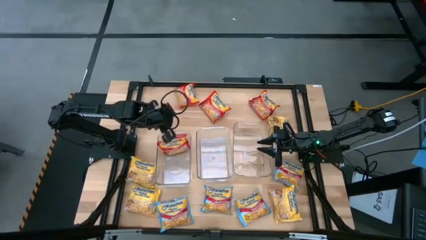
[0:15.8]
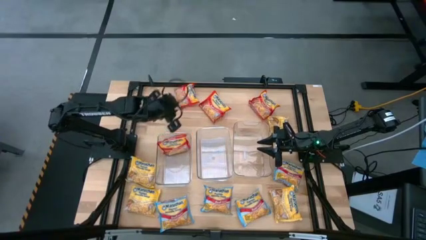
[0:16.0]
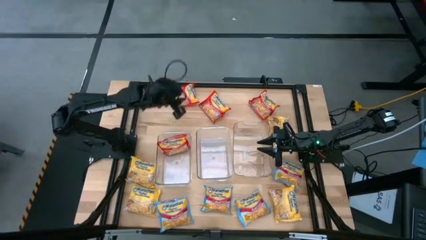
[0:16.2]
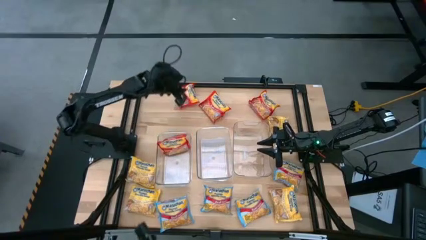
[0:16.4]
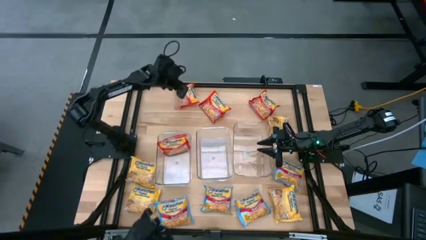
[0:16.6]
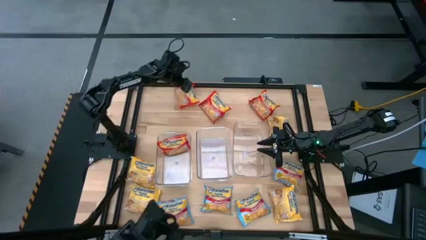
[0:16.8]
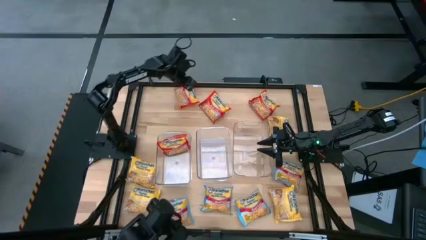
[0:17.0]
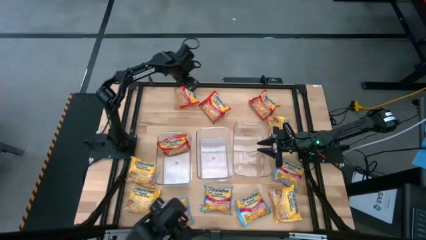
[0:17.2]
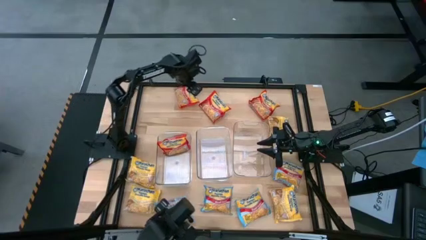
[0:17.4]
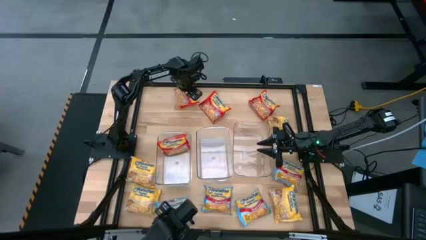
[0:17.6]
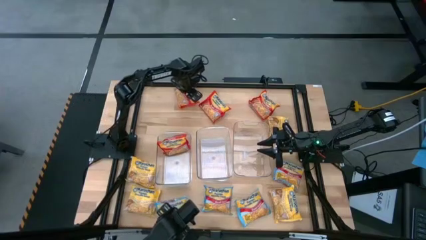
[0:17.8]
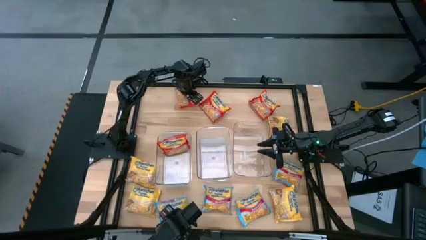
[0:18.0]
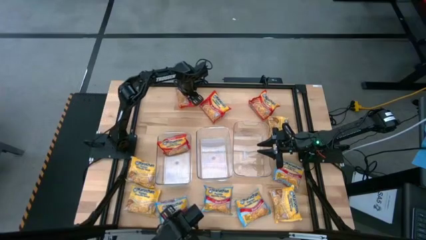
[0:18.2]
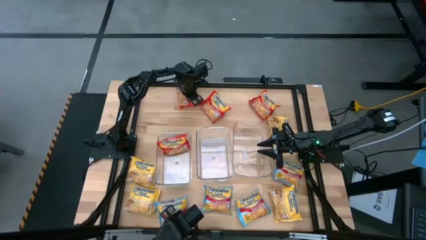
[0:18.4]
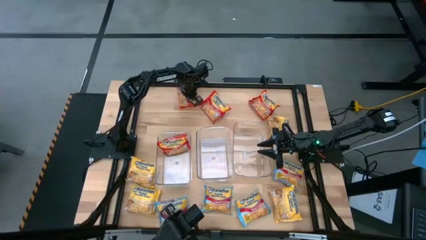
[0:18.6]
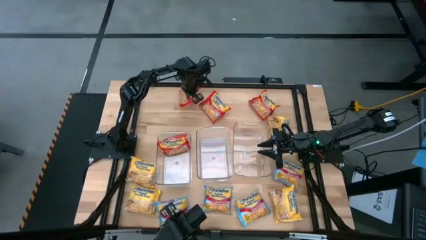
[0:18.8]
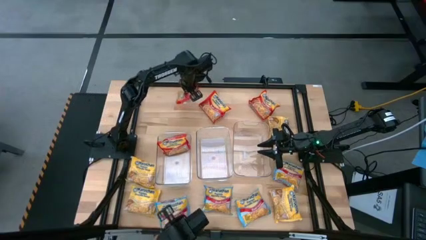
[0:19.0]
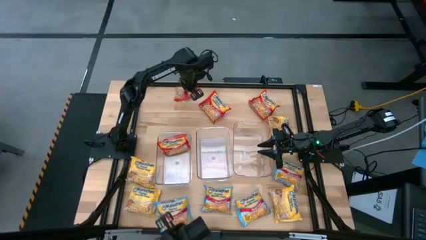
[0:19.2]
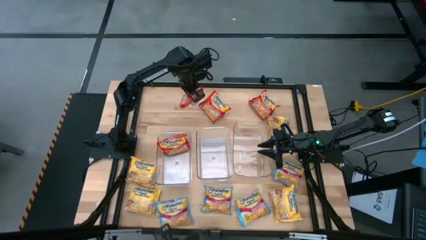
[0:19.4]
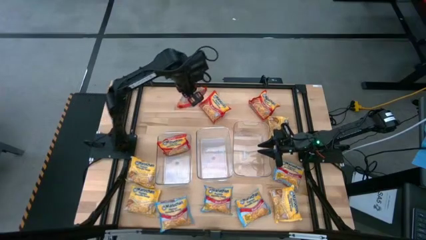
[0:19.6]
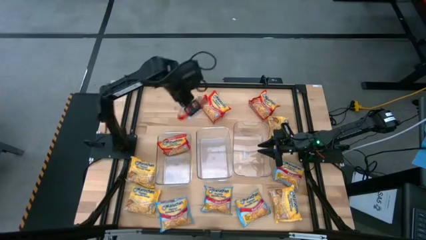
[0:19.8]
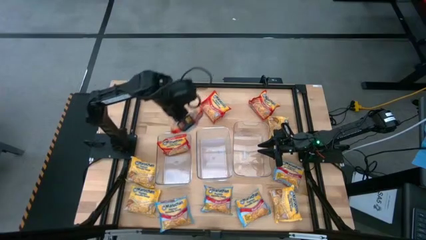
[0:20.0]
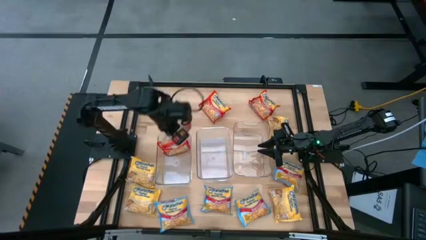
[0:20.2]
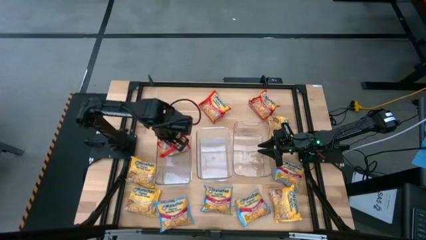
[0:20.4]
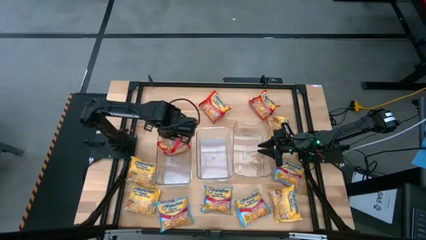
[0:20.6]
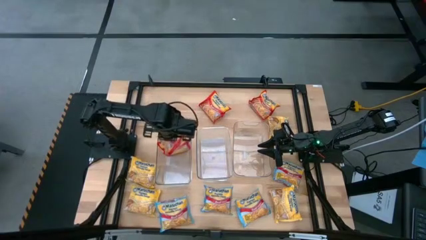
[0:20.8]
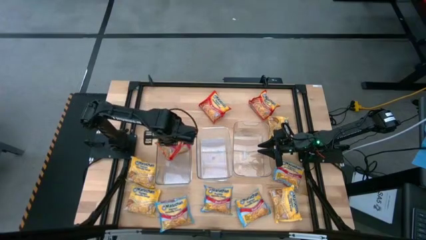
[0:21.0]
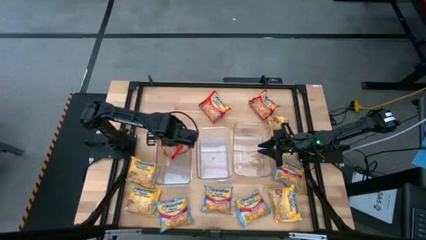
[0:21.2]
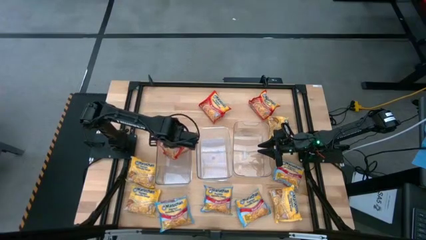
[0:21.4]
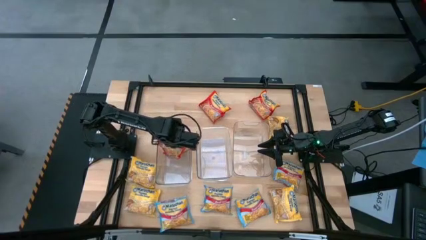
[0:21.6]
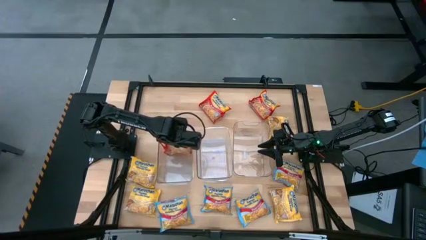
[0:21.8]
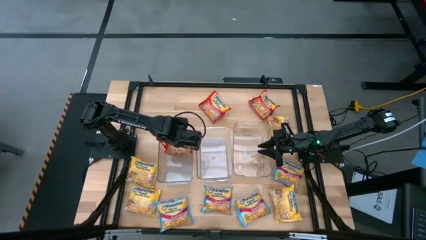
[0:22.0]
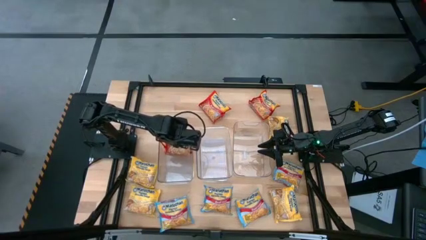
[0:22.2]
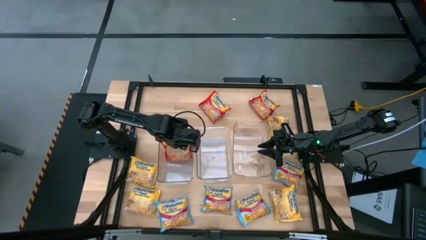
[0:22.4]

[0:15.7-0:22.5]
Task: Sort Maruchan noodles
Put the red noodle pack into the left transparent bin

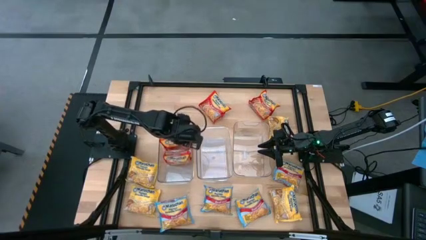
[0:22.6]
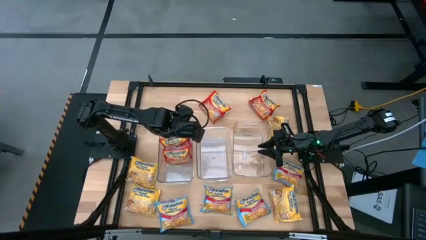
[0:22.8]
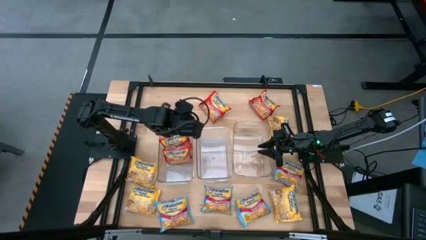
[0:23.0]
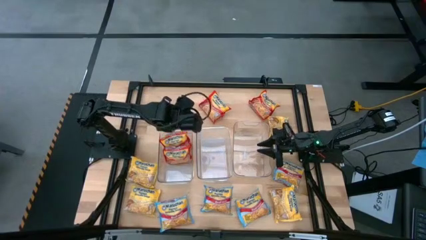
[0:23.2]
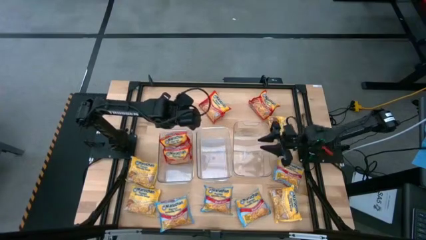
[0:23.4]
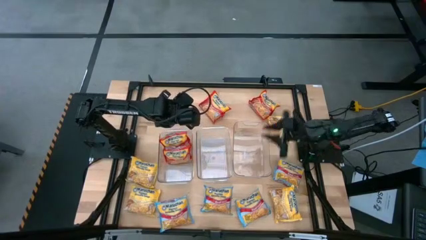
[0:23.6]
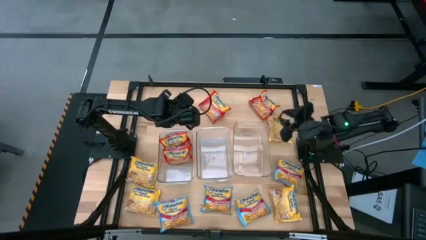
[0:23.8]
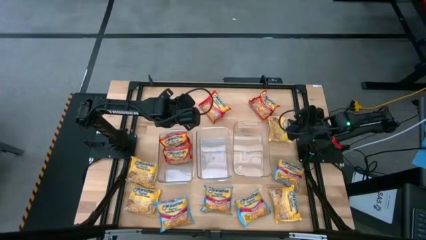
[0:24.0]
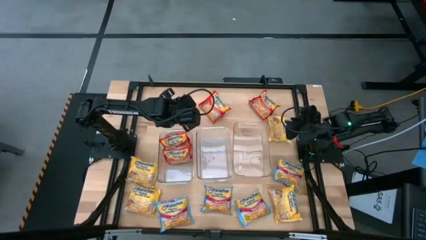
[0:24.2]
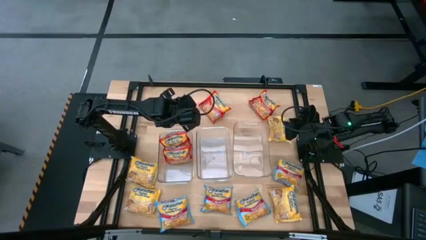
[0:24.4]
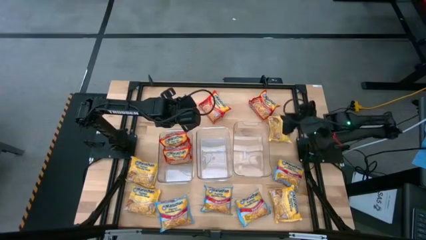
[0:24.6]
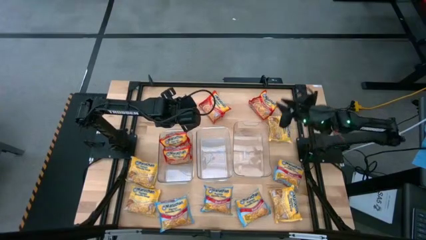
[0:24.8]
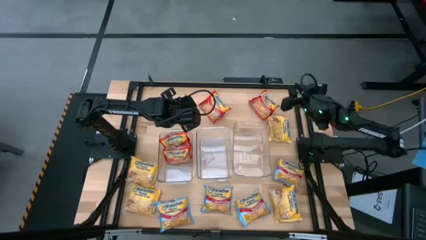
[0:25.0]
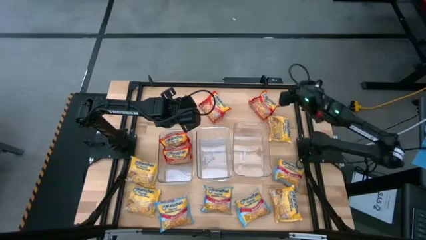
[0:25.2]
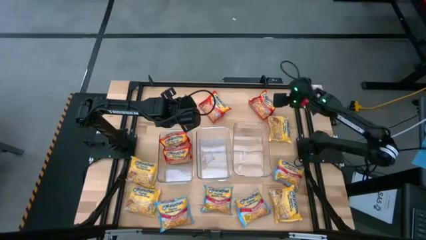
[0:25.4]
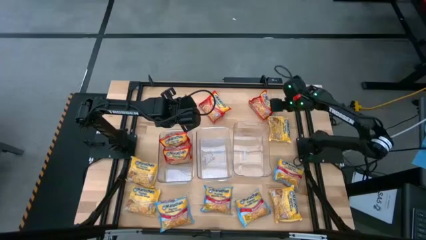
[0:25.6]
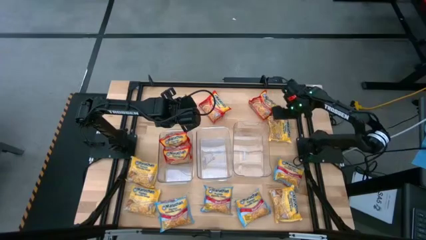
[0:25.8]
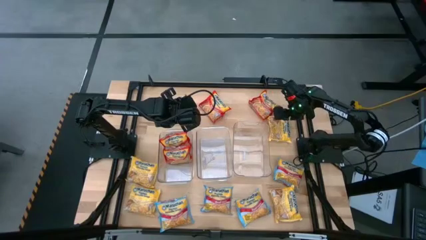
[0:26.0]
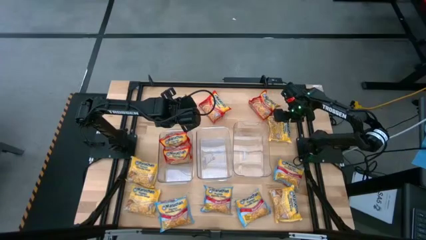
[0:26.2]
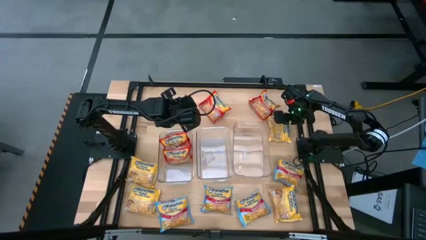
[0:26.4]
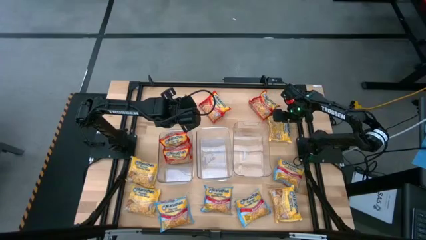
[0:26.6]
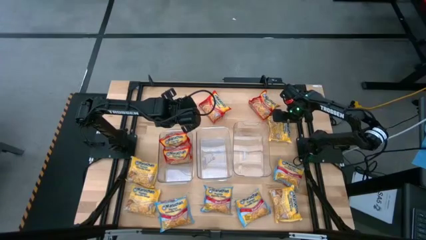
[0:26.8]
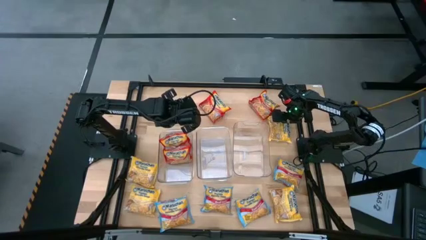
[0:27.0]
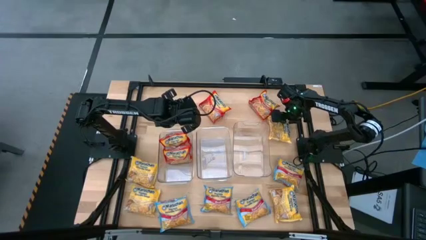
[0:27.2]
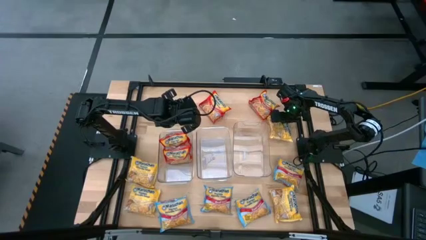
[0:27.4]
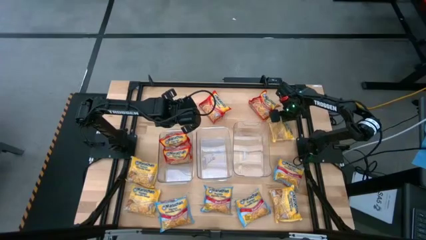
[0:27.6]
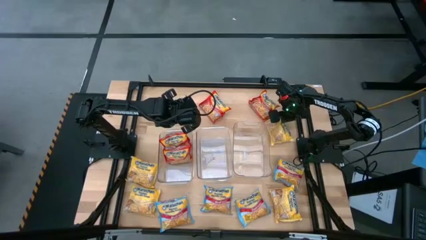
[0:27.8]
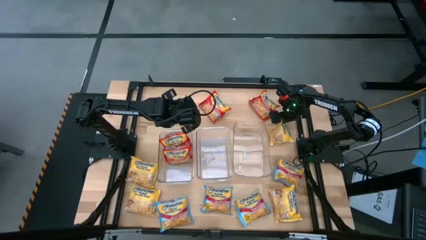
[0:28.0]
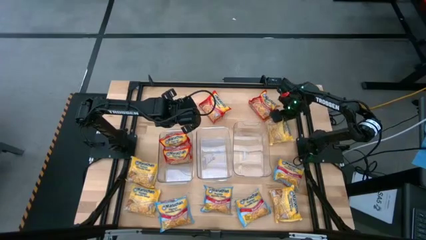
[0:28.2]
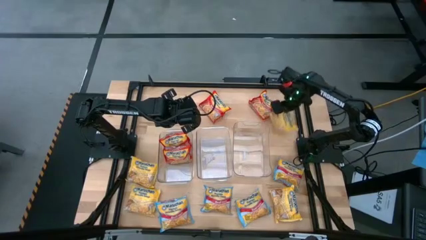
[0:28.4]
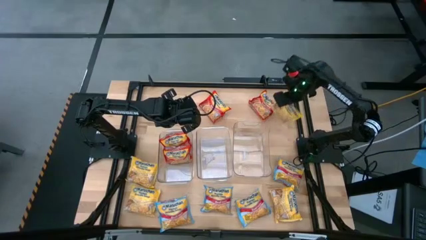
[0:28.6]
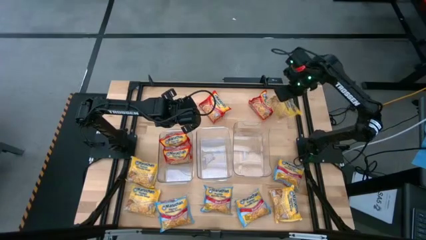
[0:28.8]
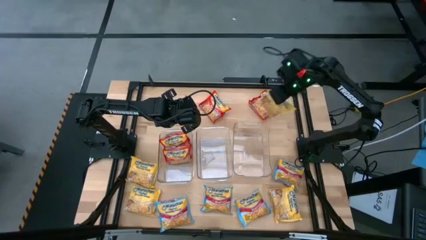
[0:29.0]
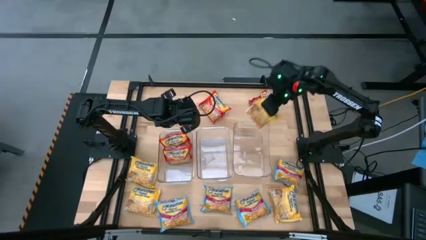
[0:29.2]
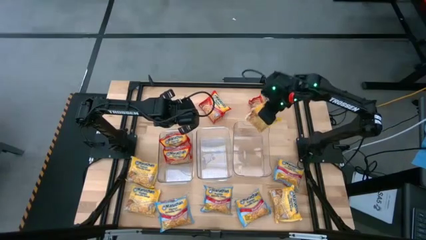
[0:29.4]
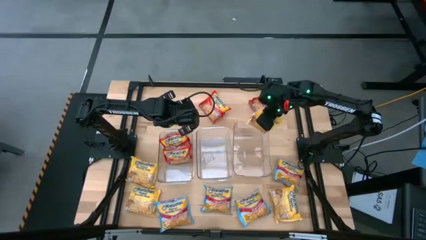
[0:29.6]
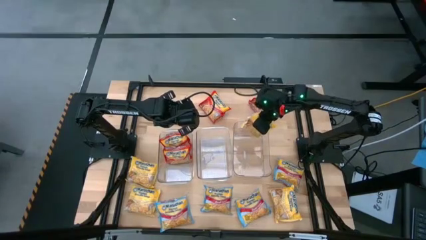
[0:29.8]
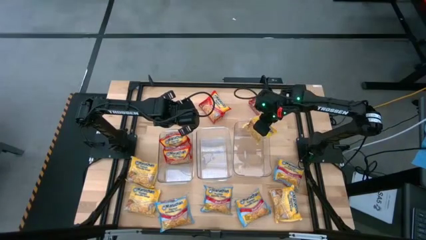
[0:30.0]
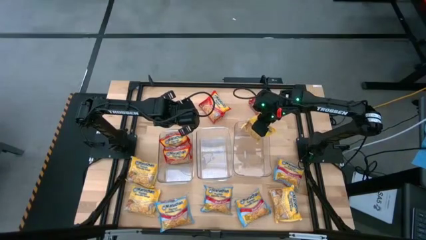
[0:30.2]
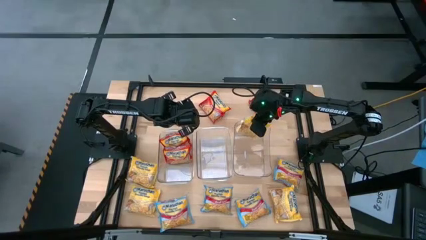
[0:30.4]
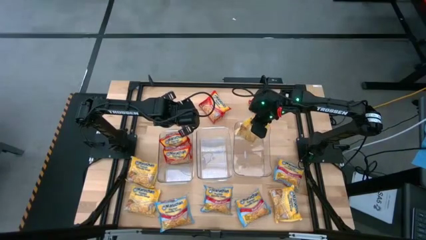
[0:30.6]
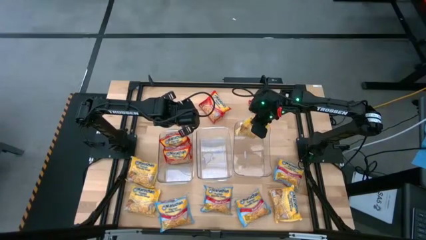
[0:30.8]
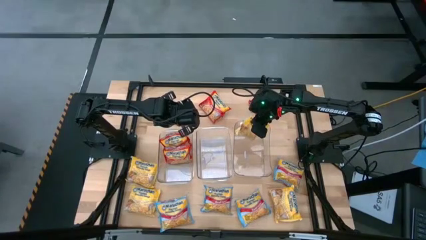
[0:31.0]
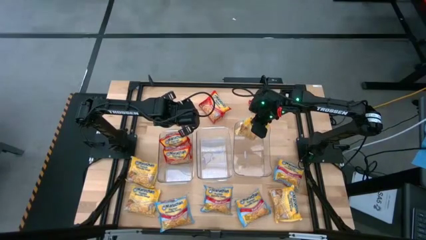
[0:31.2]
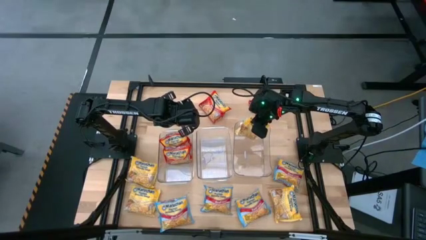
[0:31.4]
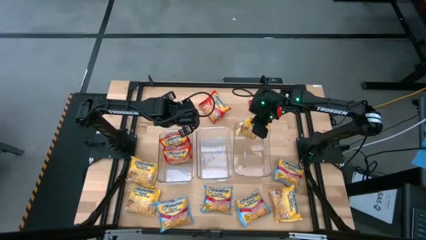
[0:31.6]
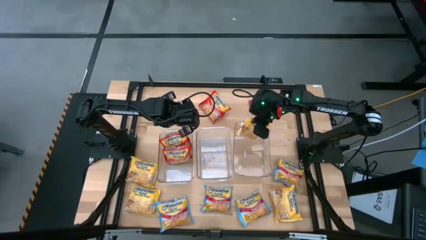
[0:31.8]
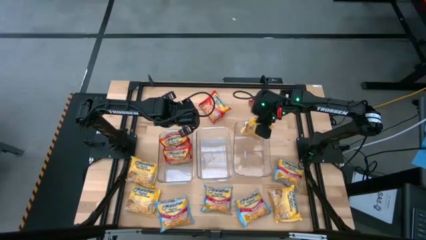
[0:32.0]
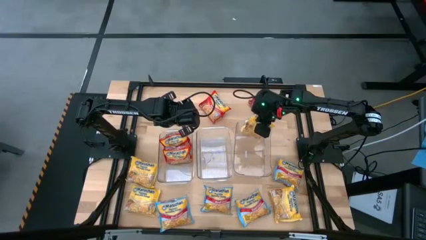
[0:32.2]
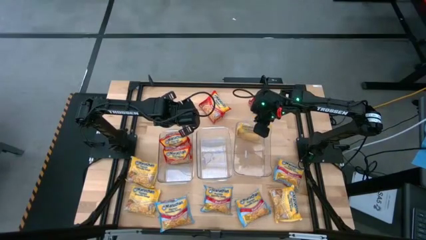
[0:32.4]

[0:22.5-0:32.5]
Put the yellow noodle pack into the right transparent bin
